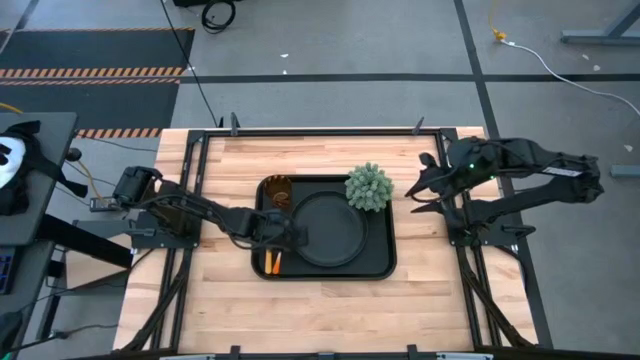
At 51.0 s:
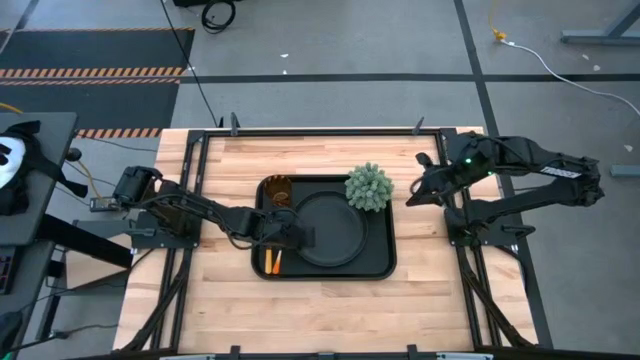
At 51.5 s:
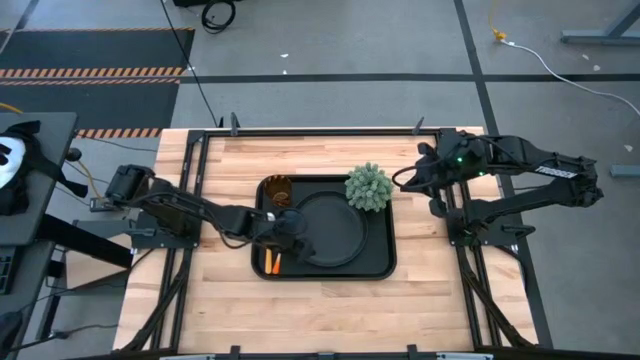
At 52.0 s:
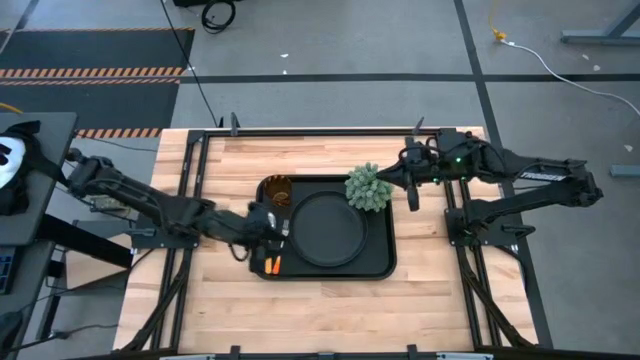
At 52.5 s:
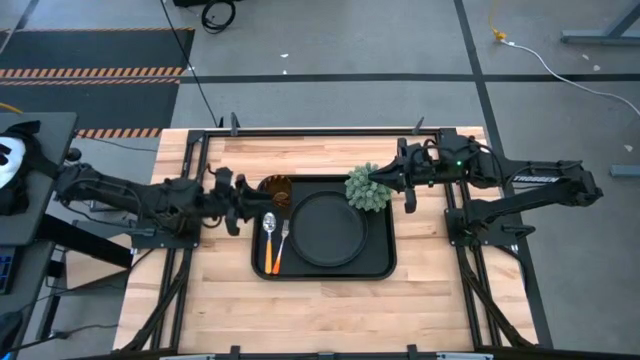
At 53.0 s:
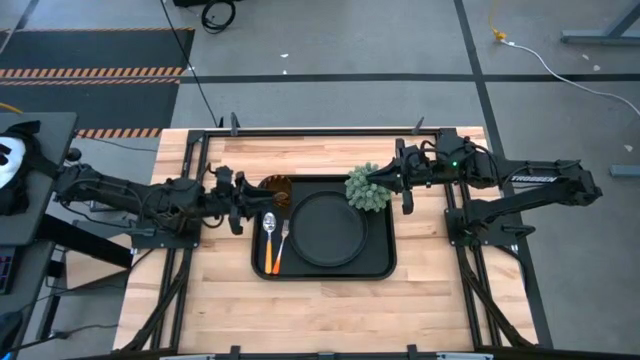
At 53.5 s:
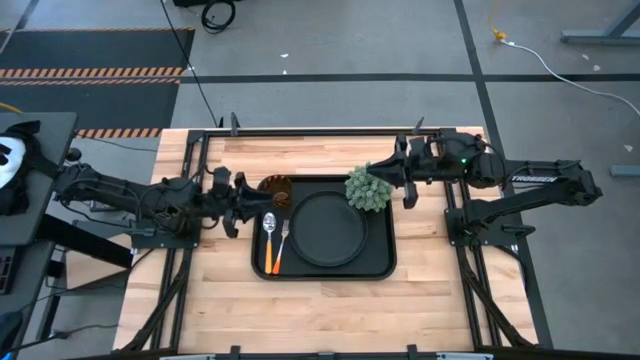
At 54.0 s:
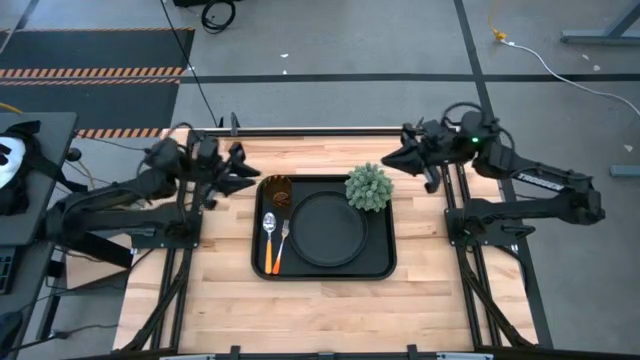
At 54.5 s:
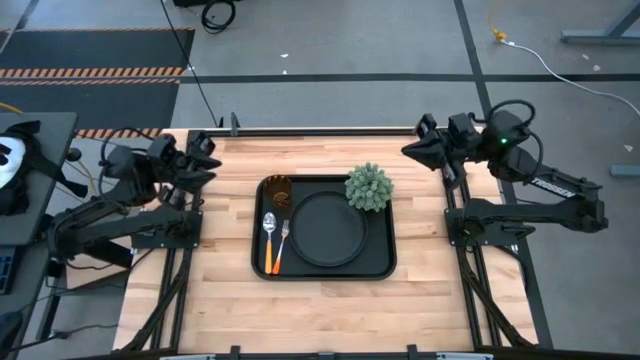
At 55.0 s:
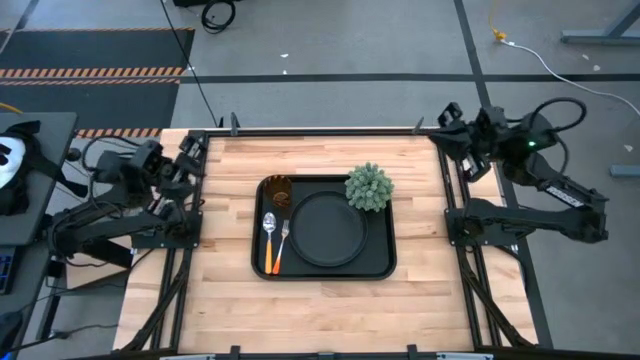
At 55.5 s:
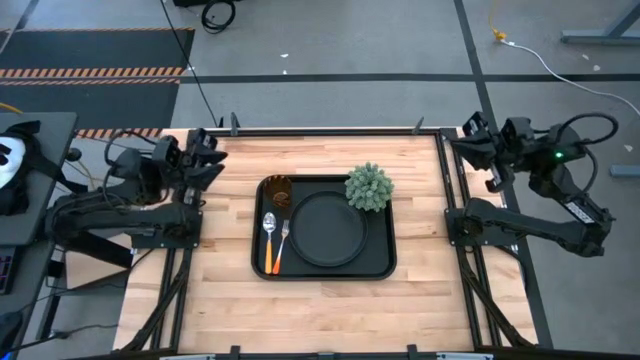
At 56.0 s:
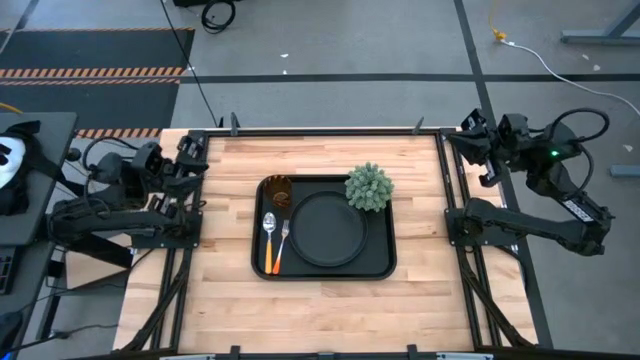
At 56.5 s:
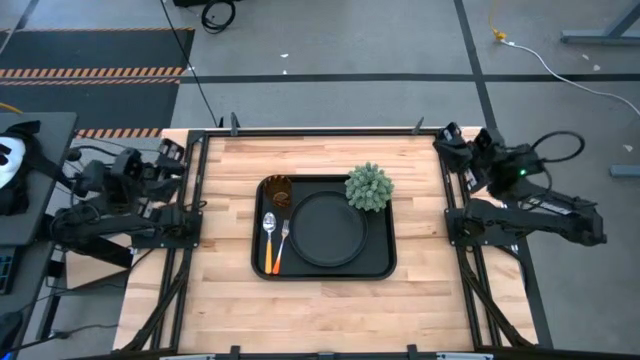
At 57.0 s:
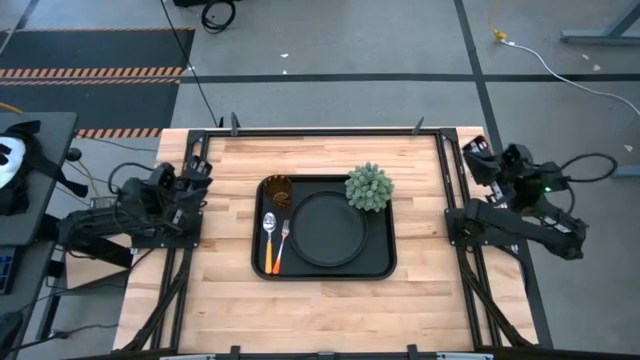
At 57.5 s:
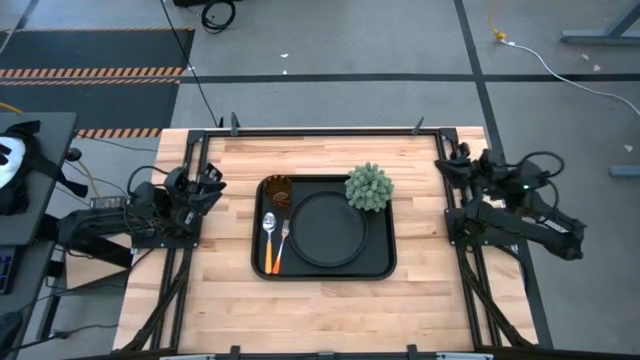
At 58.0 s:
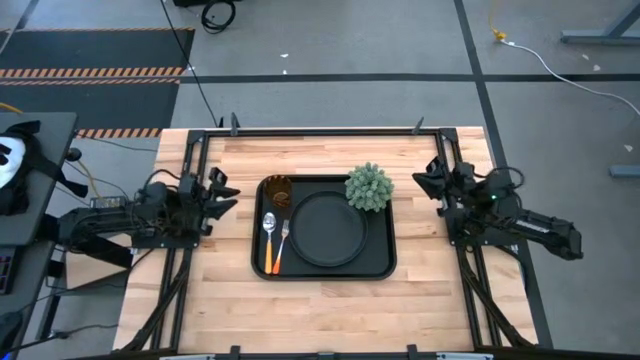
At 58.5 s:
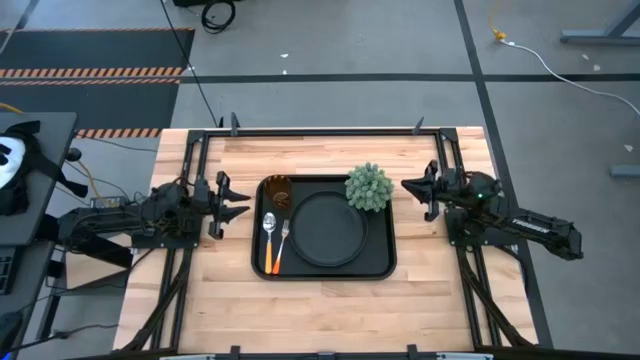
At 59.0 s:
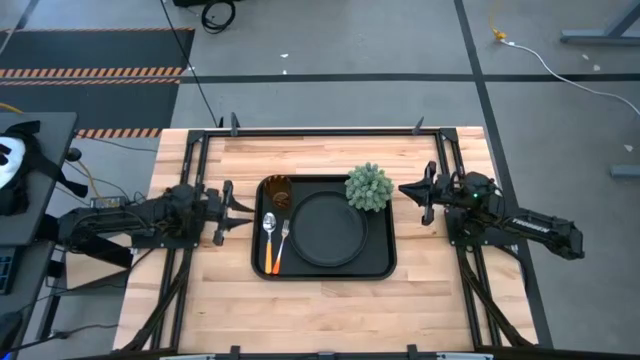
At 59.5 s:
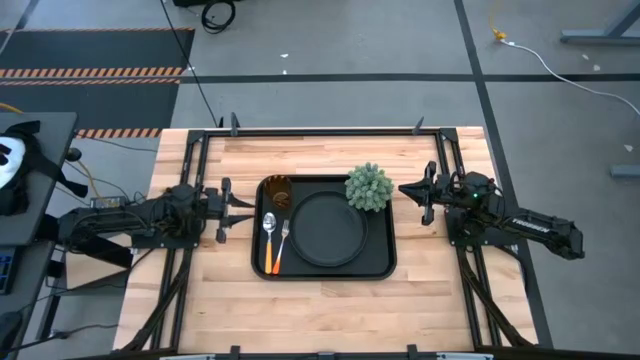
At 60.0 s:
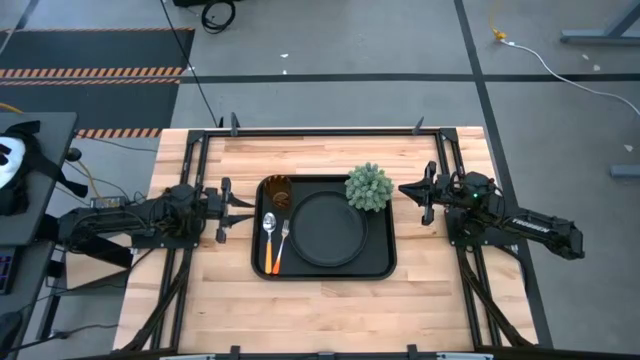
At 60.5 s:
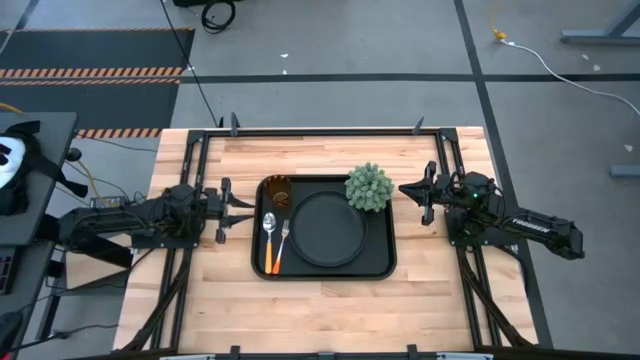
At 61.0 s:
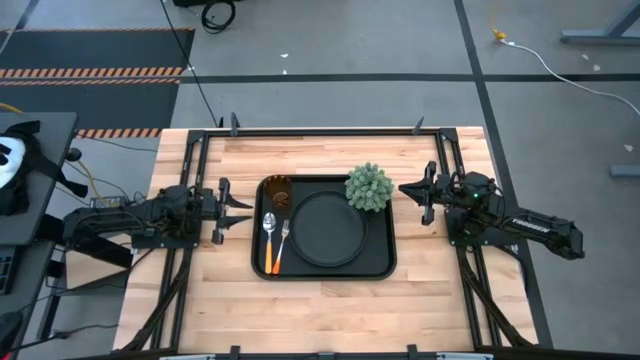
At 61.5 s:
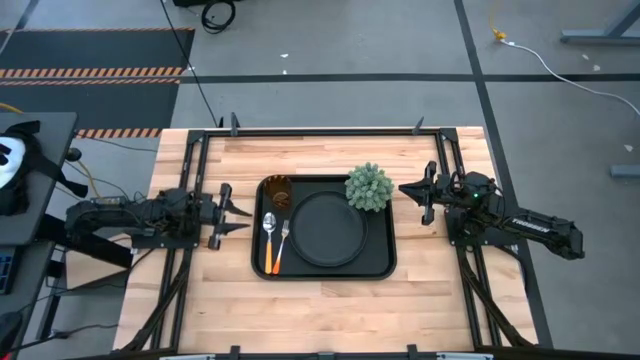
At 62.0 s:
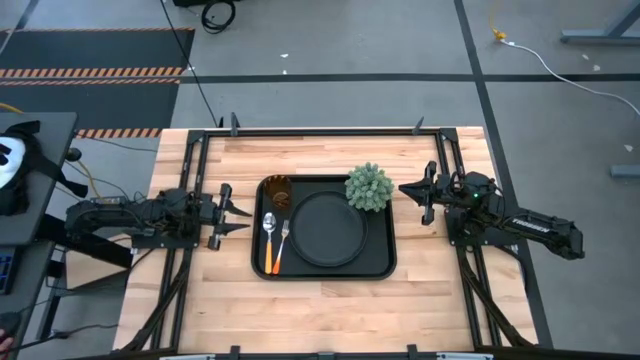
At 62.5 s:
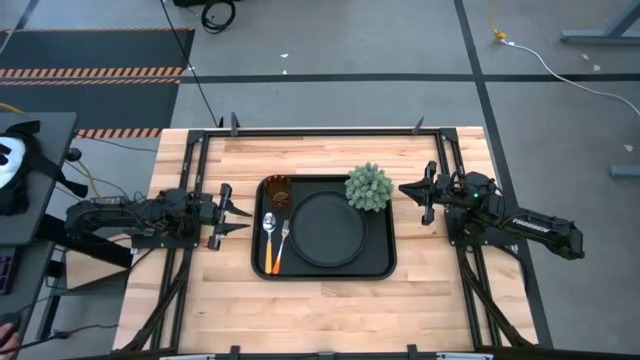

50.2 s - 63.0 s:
Task: Pick and place plate/cup/fork/spoon on tray
Return to Home Position

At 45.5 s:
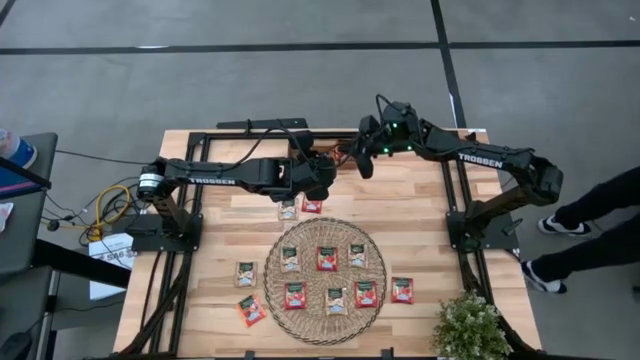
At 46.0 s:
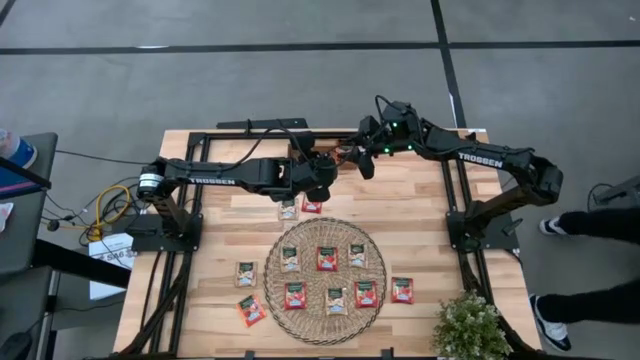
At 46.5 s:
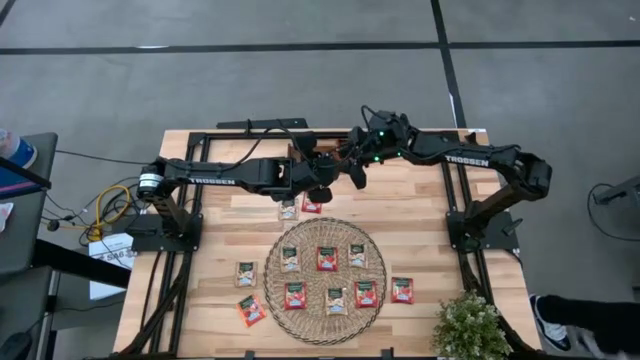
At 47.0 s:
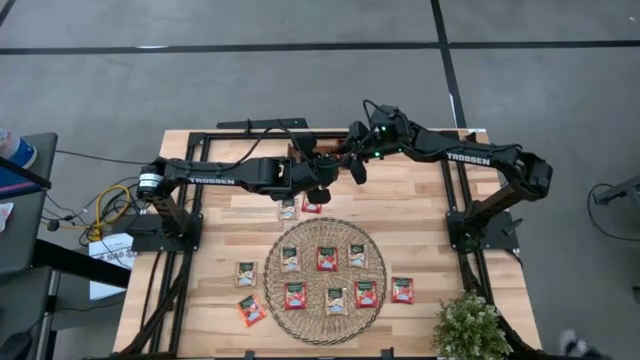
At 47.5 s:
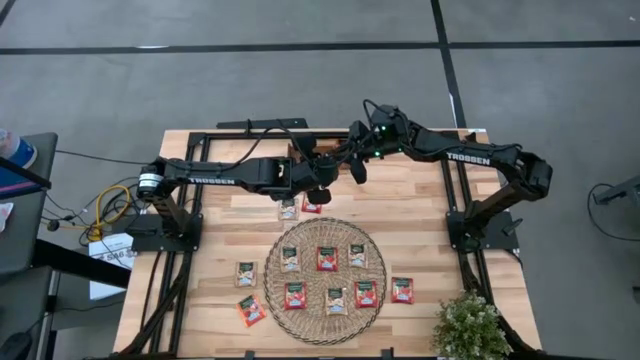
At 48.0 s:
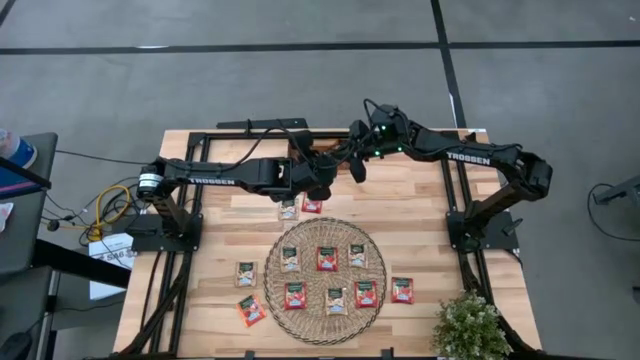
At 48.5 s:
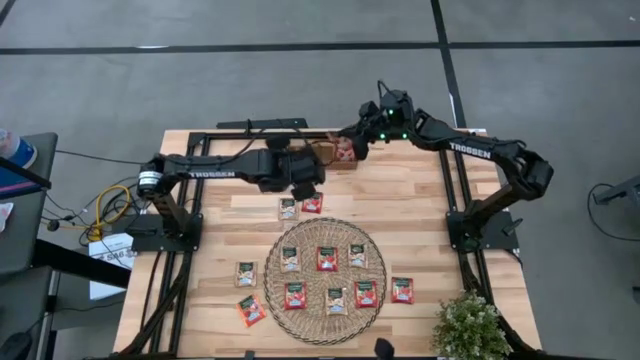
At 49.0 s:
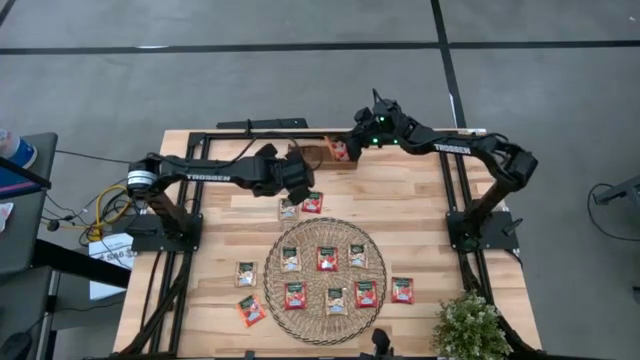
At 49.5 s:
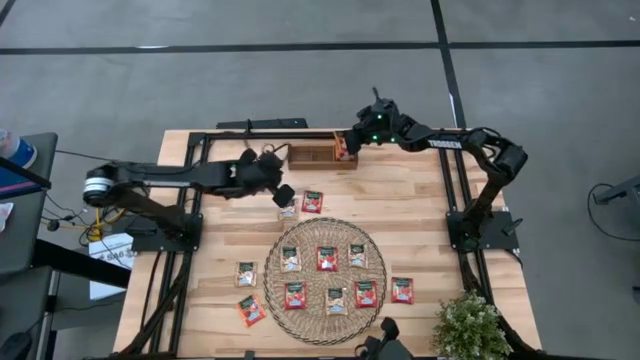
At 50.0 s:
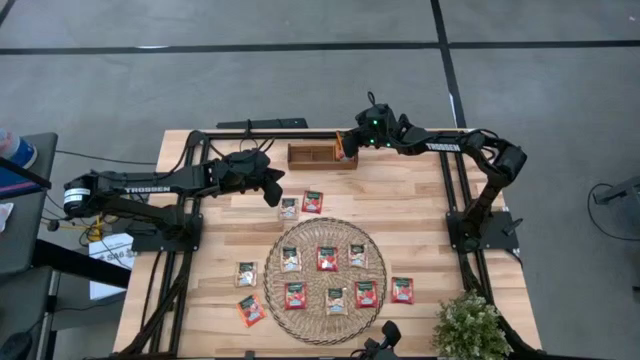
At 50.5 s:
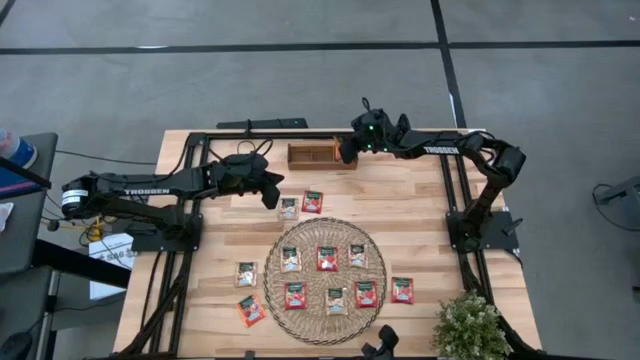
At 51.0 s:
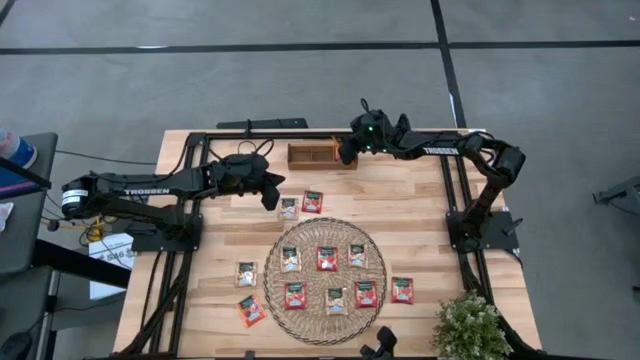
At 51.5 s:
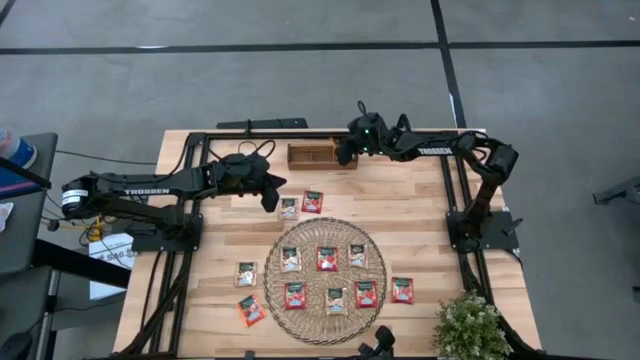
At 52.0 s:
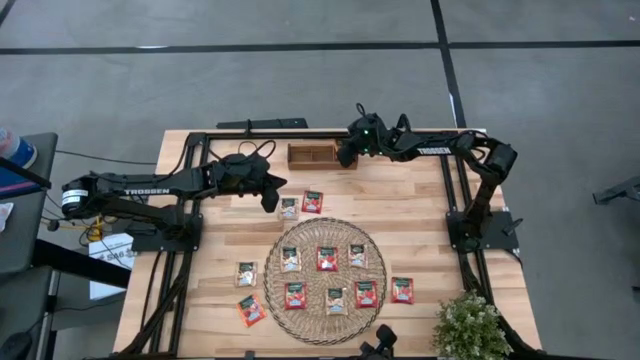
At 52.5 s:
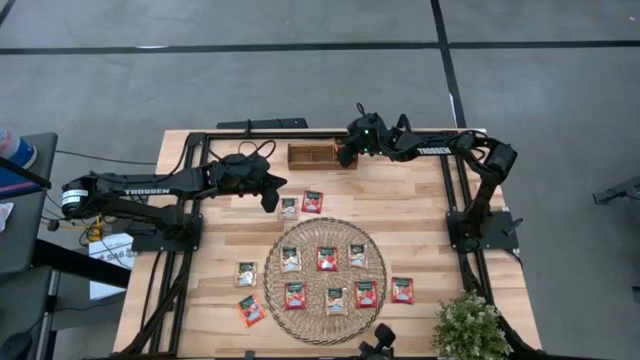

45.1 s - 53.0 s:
Task: Pick & Place Tea
Put the orange tea bag into the right section of the wooden organizer
